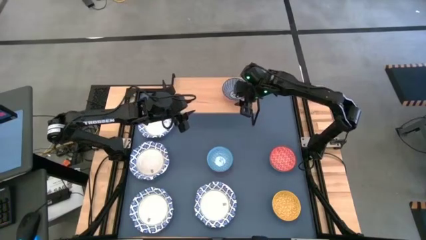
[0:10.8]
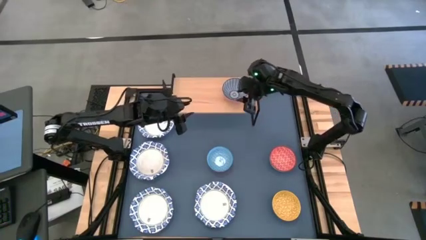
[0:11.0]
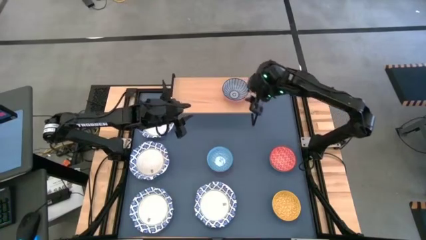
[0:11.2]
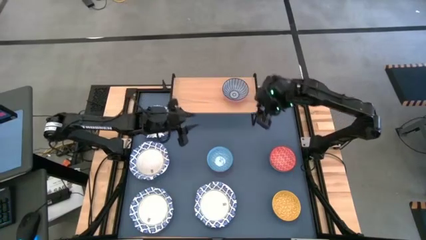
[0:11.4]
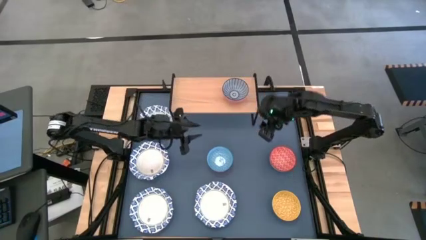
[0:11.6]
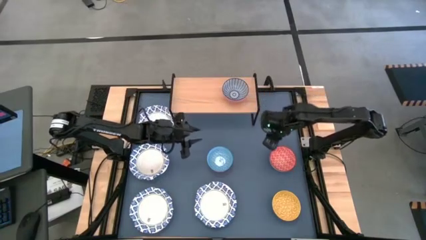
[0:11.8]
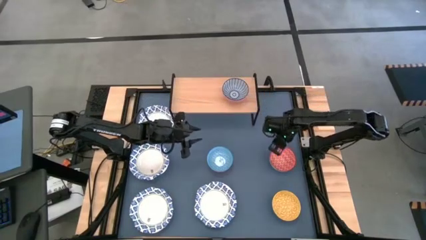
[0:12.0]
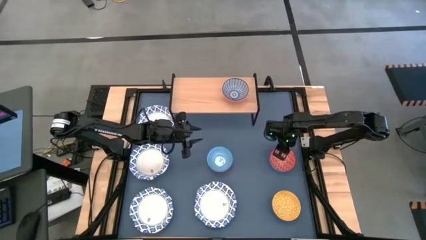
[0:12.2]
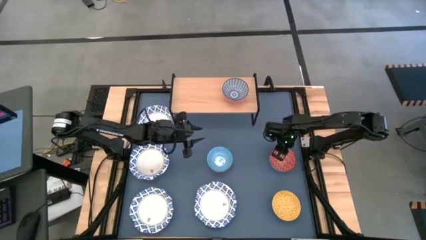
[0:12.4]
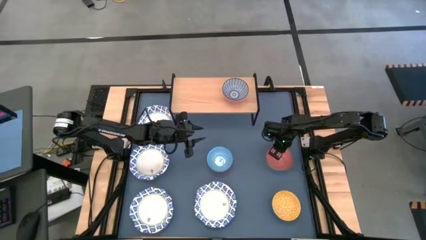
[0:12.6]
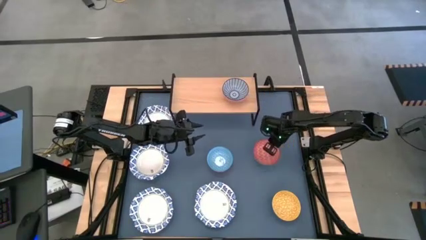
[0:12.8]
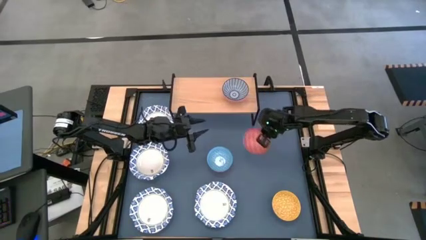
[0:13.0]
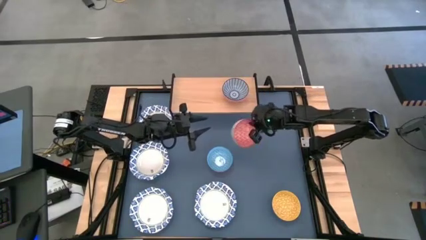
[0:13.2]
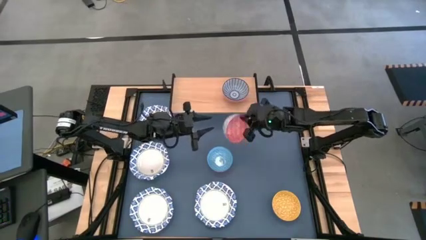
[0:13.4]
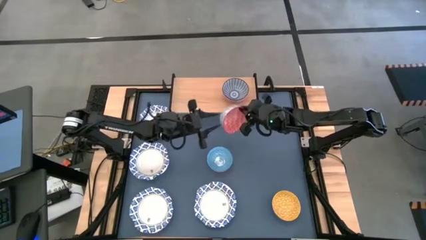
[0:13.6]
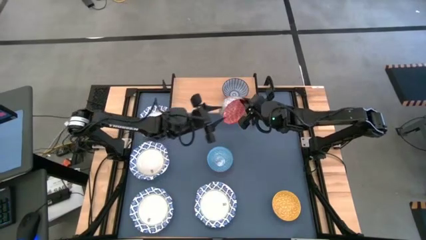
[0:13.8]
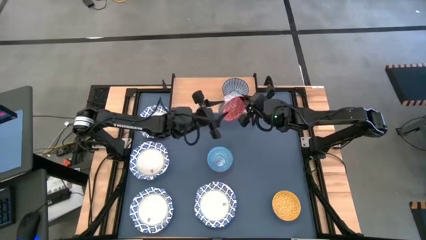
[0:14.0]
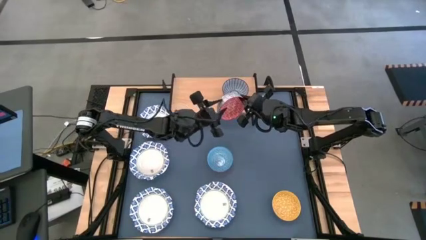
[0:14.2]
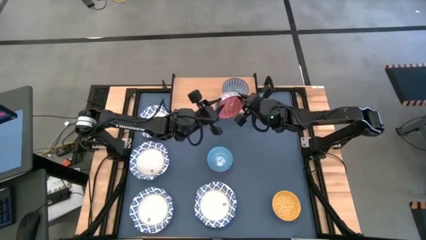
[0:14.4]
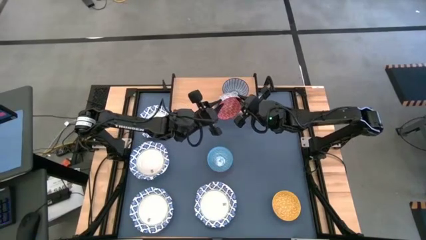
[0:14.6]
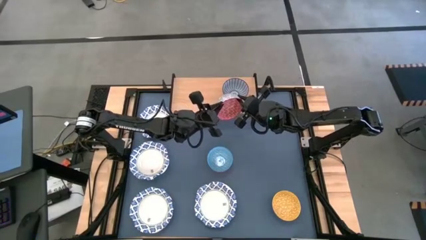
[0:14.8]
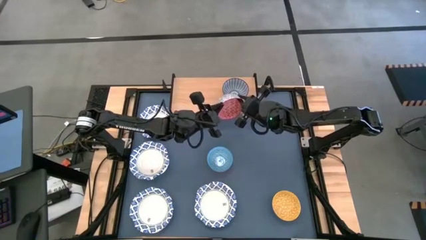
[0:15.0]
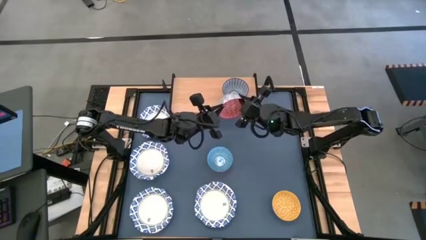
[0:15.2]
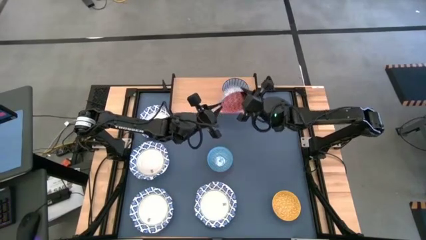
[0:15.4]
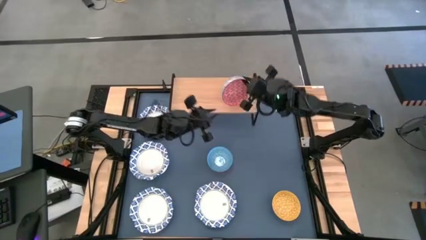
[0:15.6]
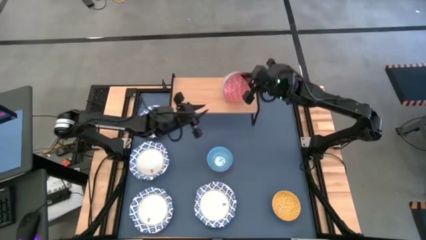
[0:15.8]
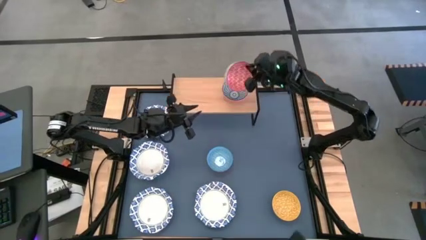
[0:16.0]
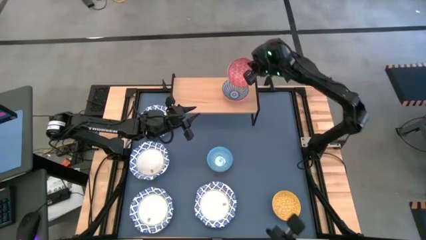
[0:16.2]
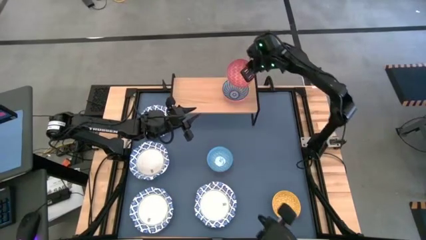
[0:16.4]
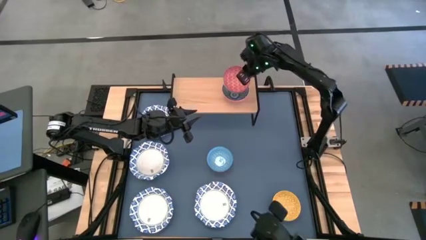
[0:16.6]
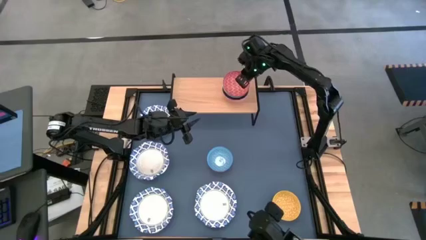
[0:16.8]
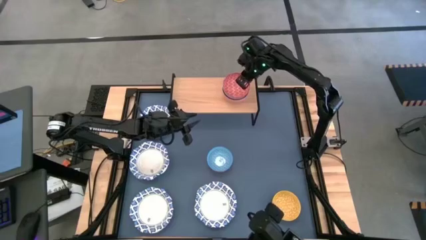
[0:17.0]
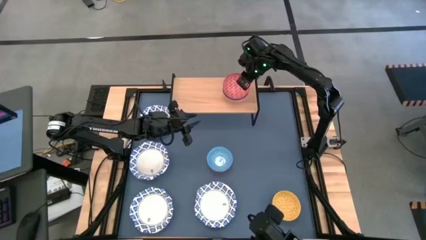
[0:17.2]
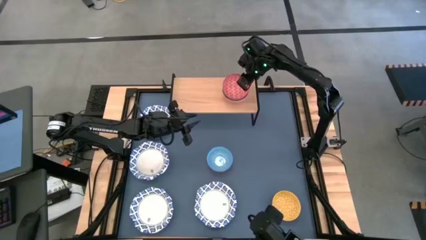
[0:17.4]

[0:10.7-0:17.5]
Task: Place and stack bowls onto a shelf
Stack the red patterned bowl on top of the dark blue patterned bowl on the shelf

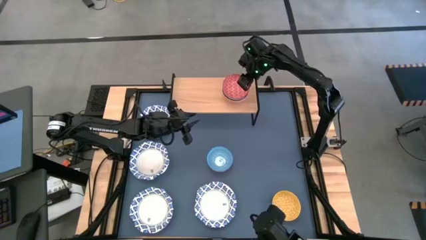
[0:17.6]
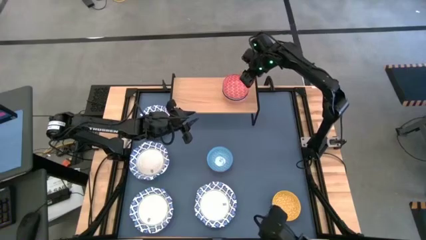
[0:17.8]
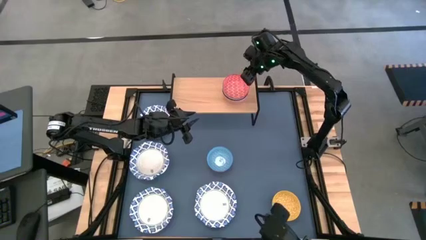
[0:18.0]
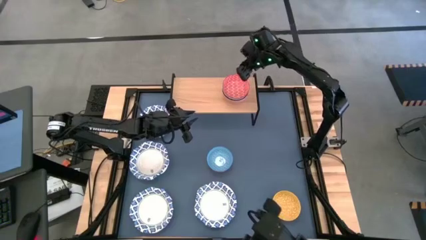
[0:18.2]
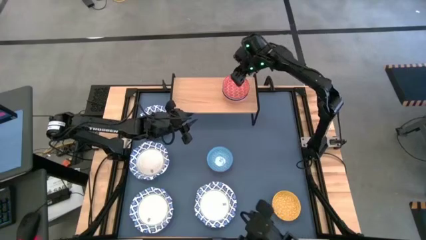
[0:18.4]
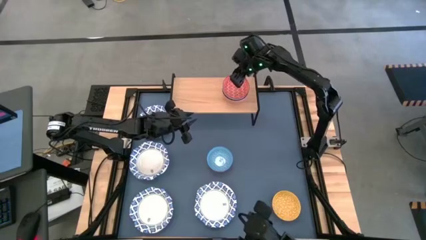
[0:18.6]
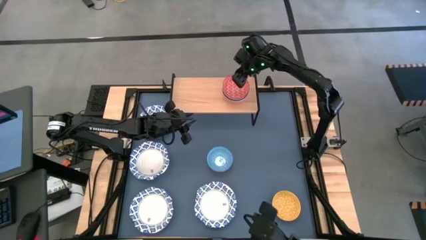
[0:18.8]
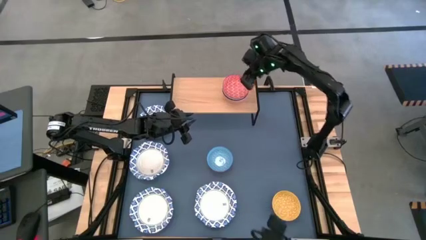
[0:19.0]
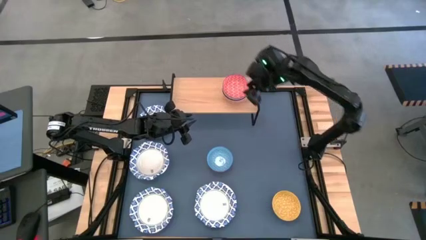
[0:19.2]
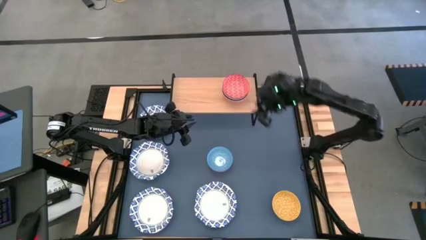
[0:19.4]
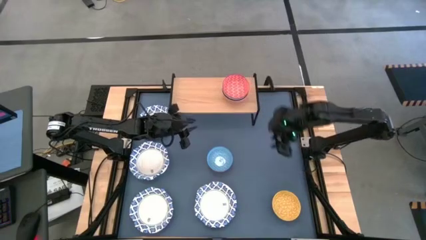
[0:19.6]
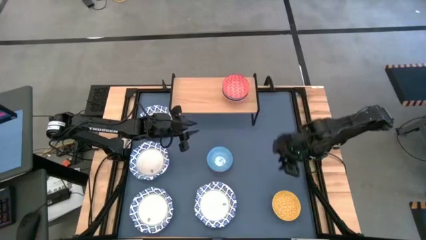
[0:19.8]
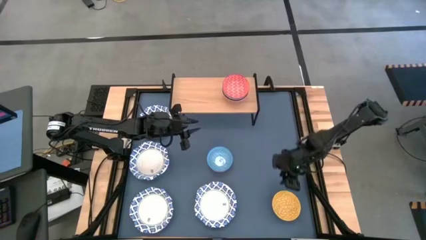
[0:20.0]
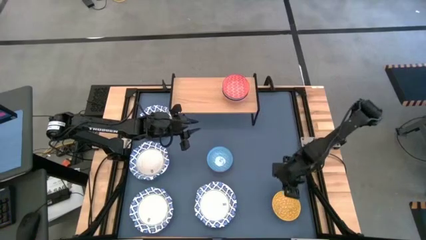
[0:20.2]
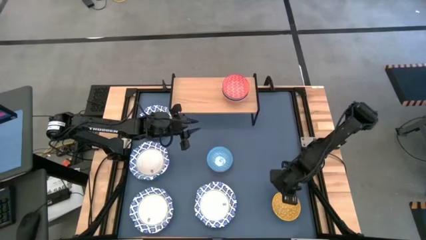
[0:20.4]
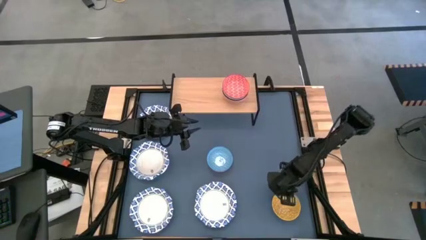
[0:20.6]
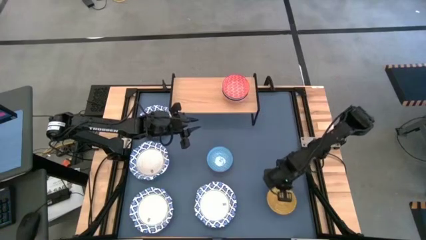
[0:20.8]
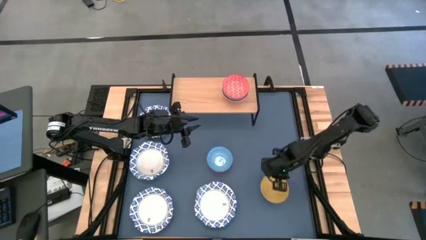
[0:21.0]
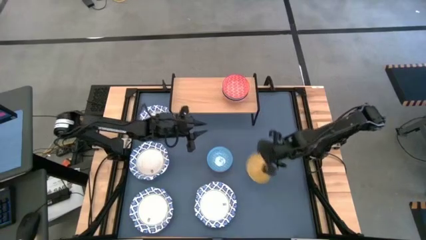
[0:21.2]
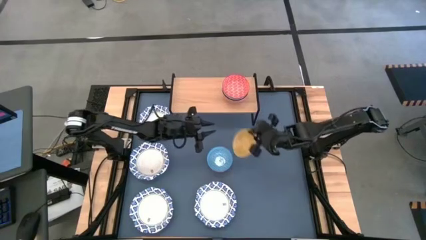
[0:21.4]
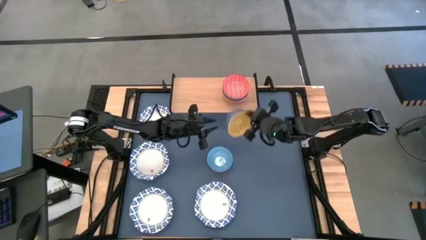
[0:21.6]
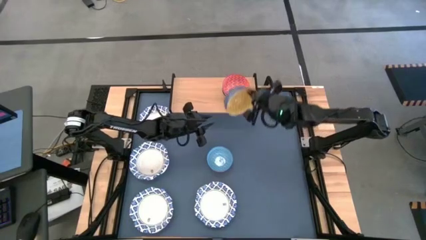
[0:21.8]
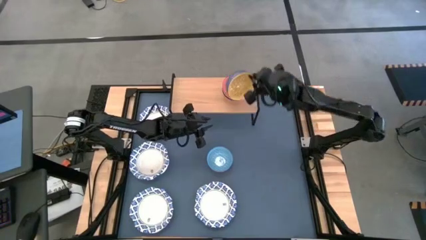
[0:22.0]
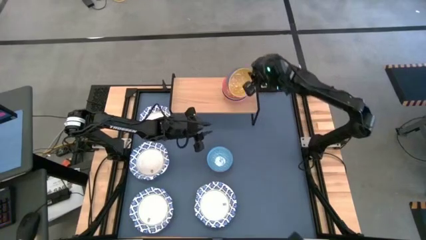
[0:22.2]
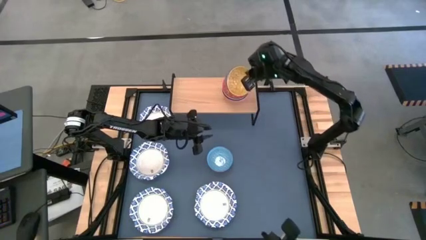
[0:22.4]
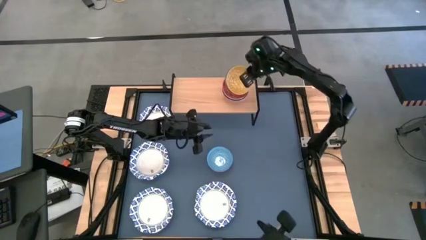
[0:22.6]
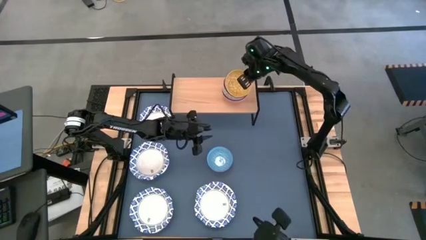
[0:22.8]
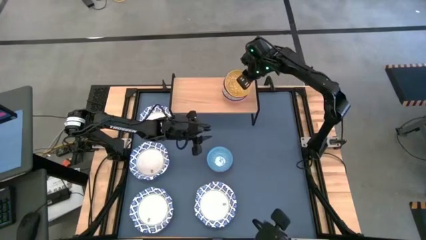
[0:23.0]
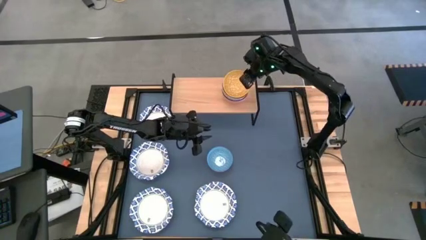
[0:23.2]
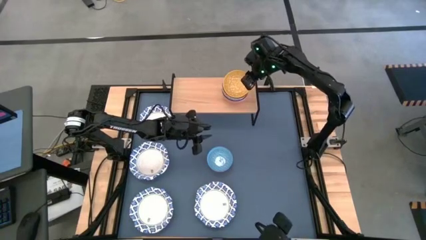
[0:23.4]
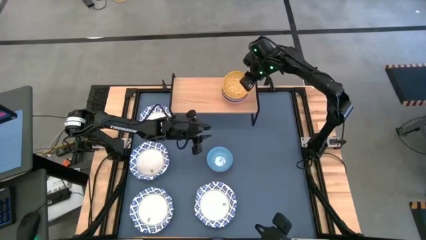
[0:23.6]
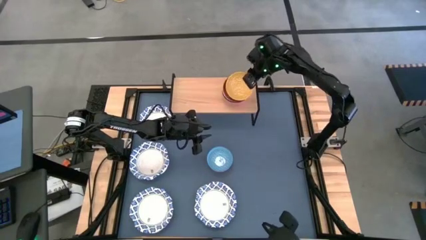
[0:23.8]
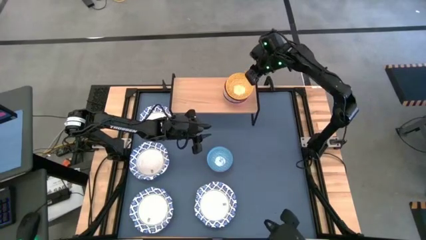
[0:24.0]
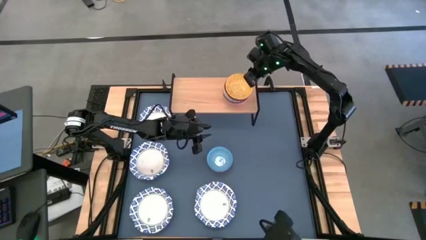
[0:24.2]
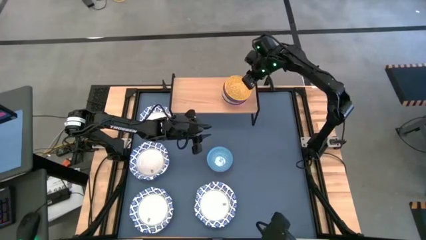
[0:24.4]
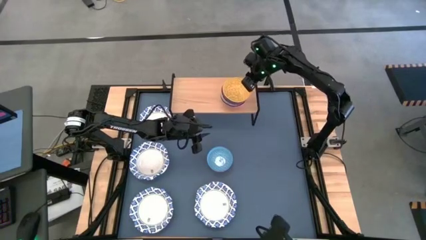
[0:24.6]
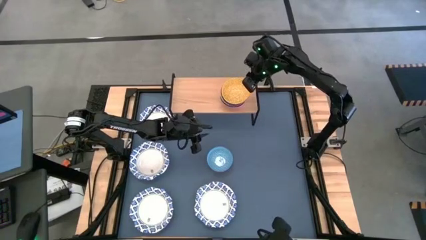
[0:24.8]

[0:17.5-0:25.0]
Stack the yellow patterned bowl on top of the red patterned bowl on the shelf

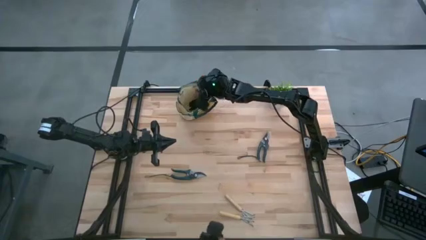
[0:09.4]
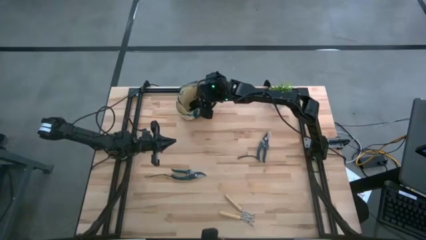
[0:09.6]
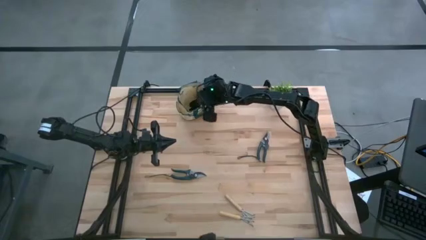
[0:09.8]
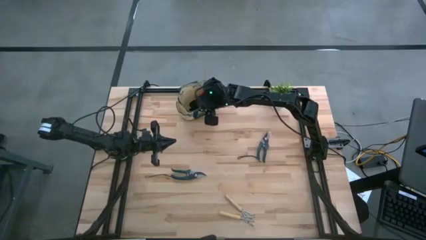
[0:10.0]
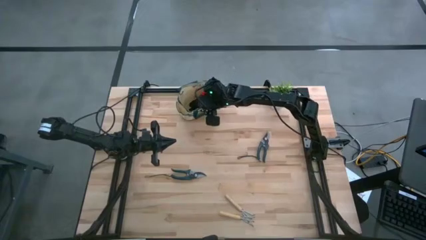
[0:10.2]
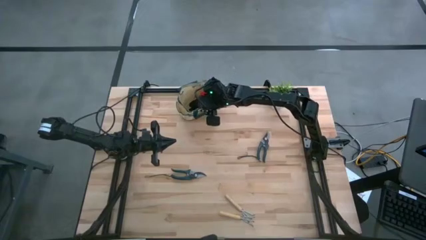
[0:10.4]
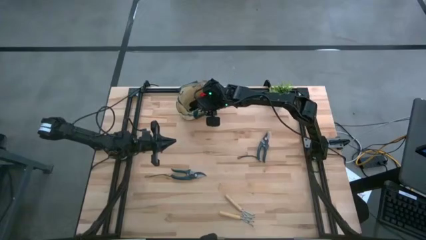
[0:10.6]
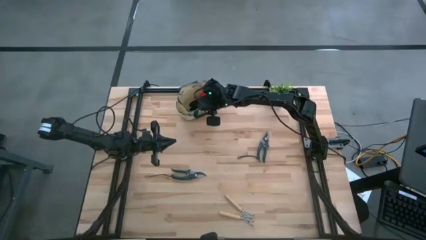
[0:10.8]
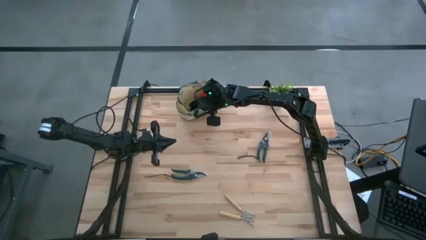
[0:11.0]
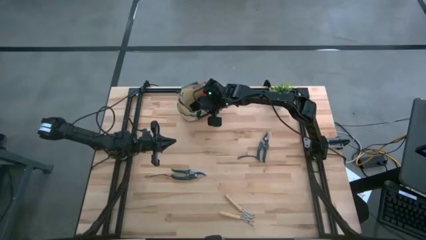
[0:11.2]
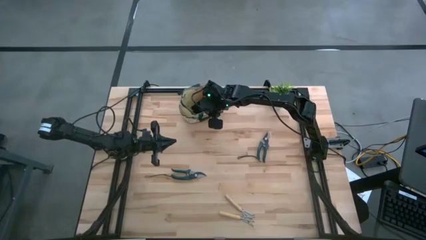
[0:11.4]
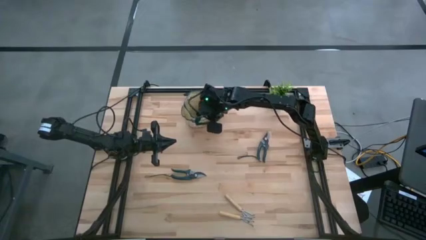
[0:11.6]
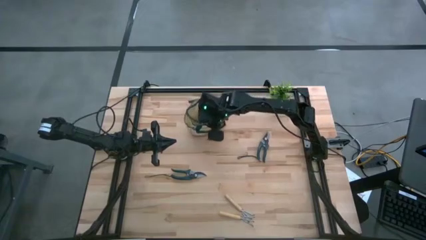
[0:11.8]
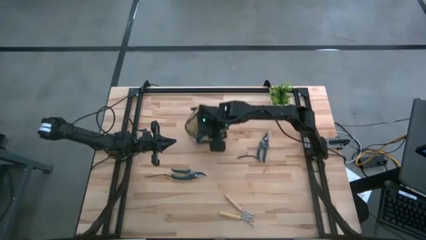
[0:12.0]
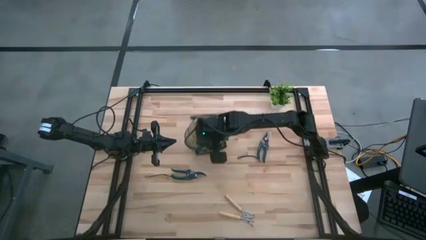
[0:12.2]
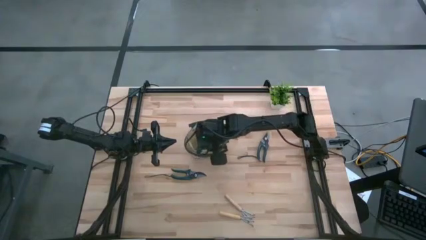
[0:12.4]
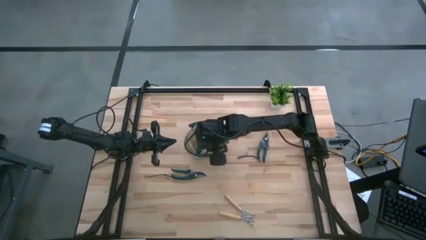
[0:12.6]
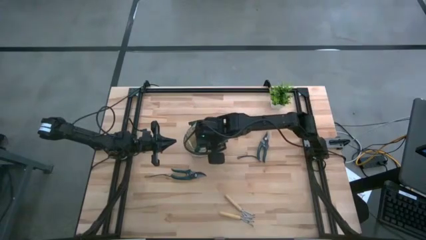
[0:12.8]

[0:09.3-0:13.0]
Task: Pick & Place Garden tools in Gardening bag
Adjust the gardening bag
